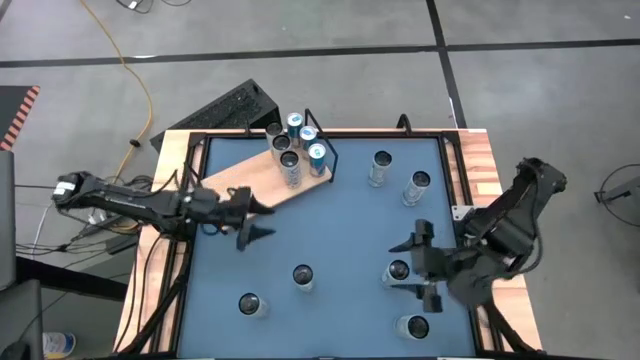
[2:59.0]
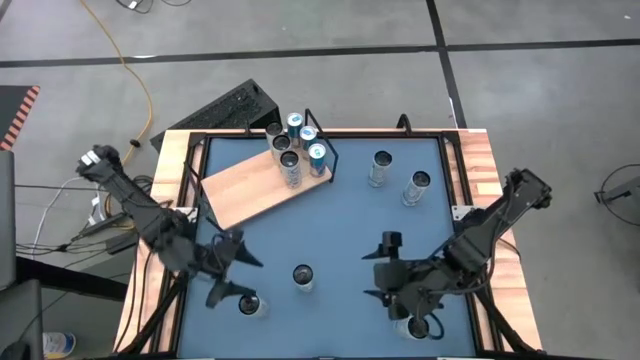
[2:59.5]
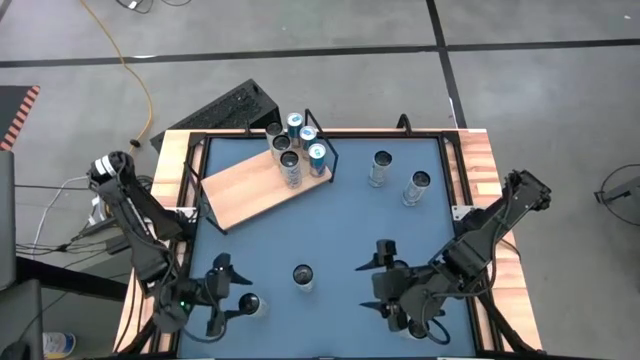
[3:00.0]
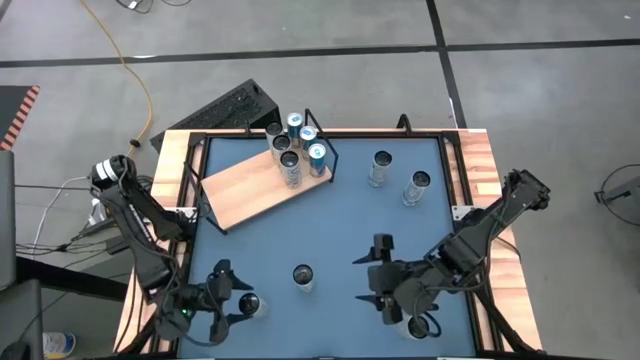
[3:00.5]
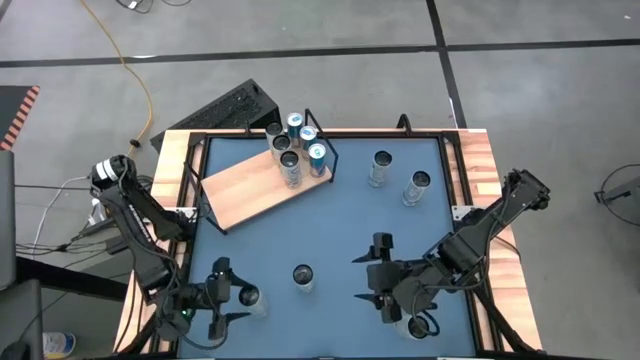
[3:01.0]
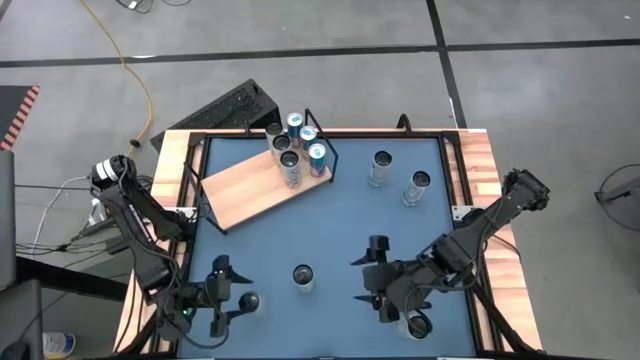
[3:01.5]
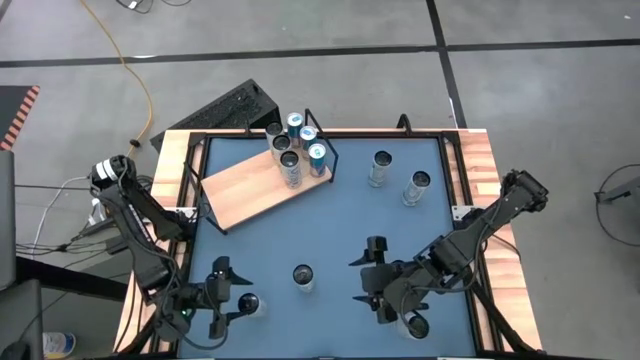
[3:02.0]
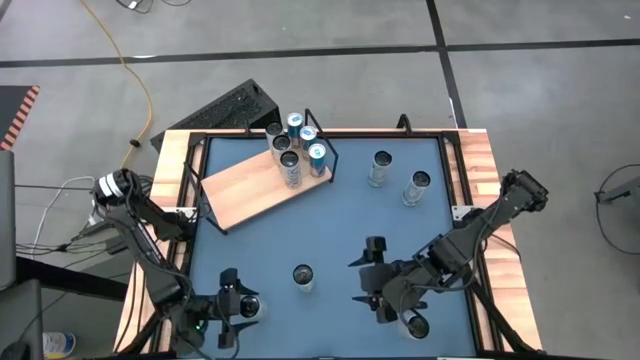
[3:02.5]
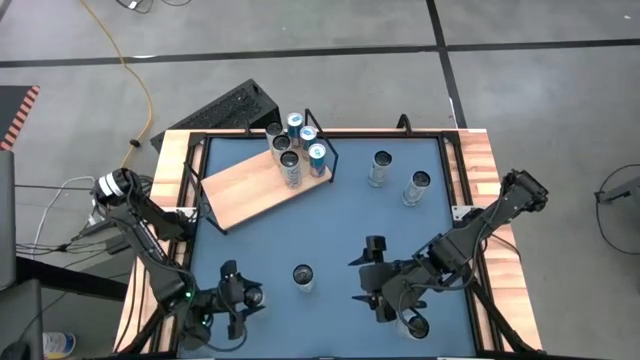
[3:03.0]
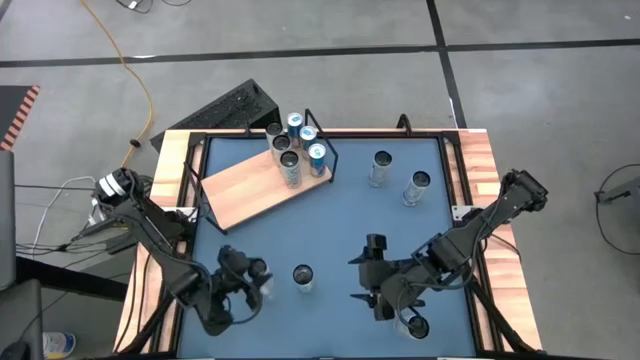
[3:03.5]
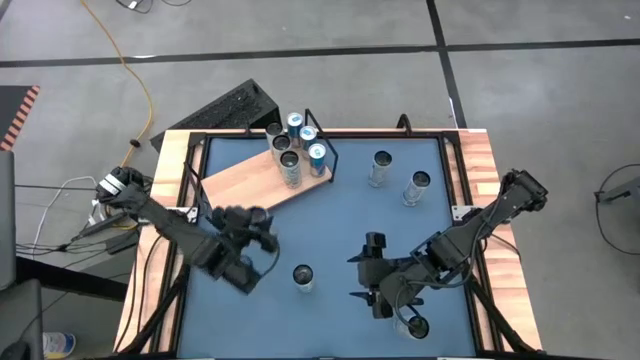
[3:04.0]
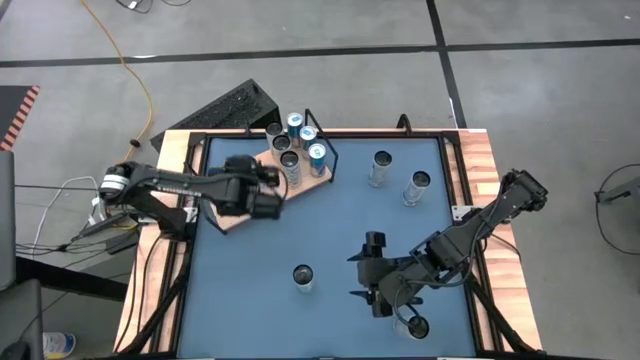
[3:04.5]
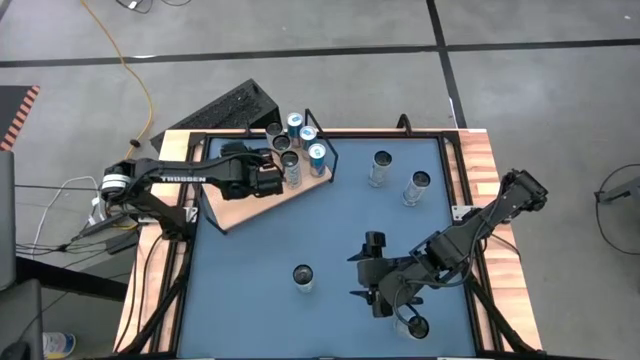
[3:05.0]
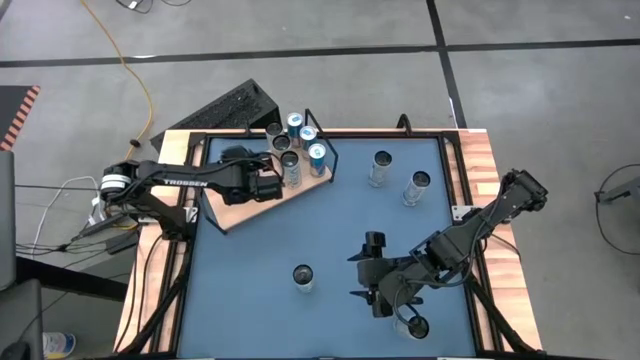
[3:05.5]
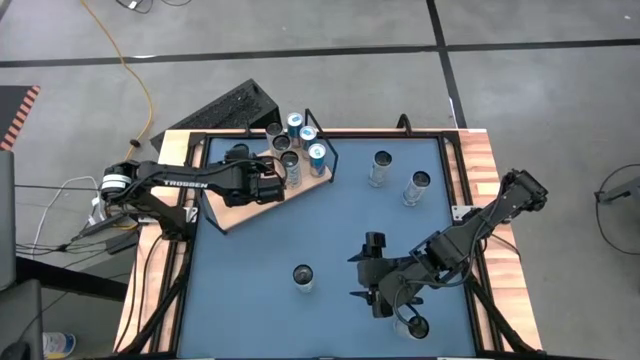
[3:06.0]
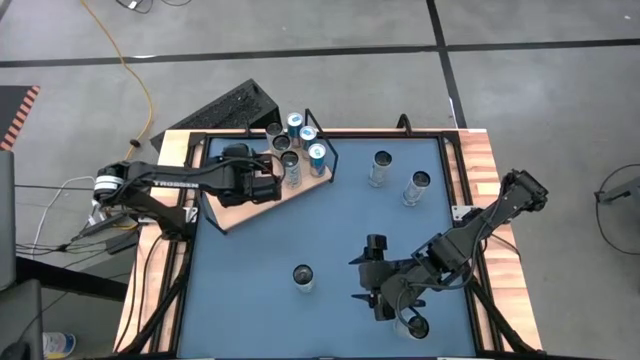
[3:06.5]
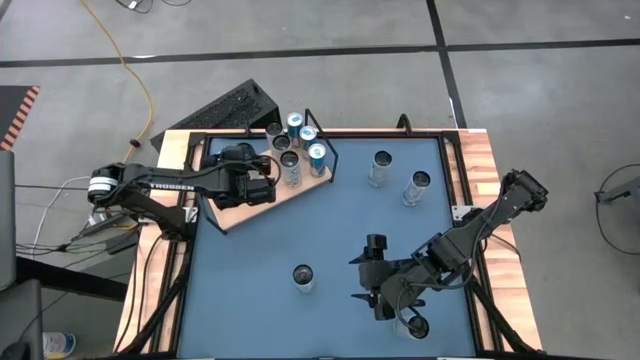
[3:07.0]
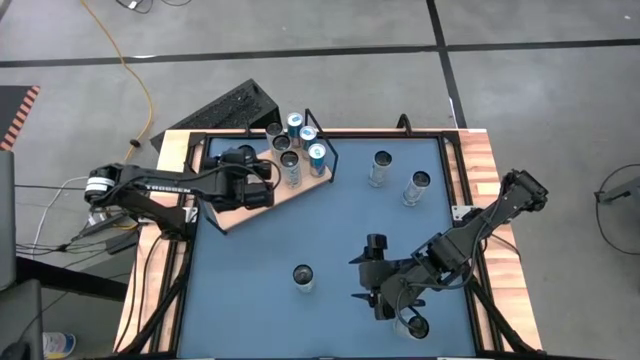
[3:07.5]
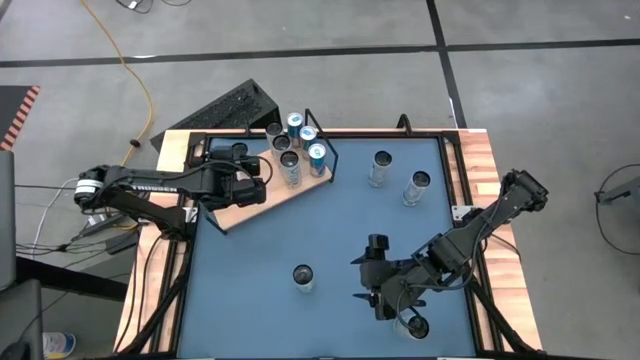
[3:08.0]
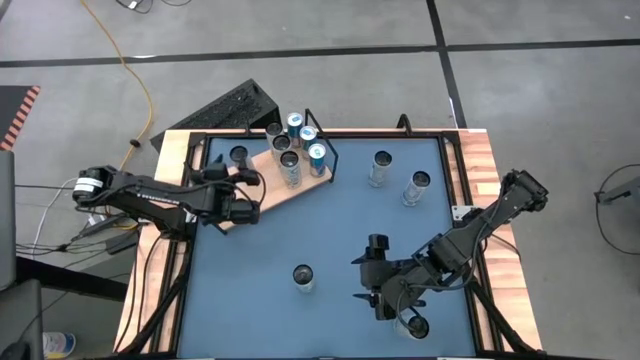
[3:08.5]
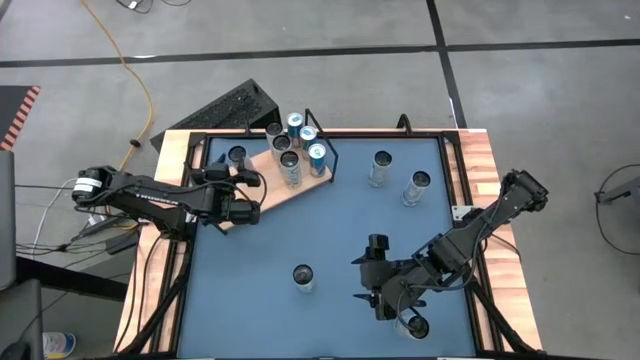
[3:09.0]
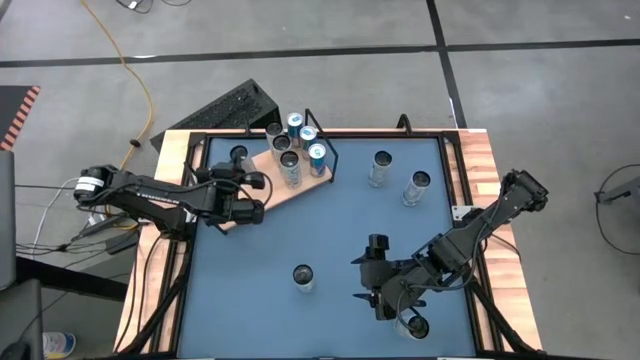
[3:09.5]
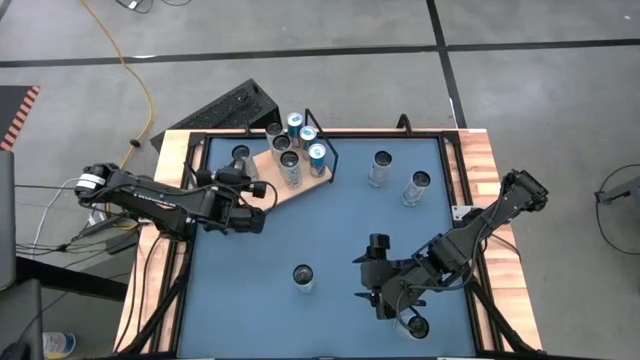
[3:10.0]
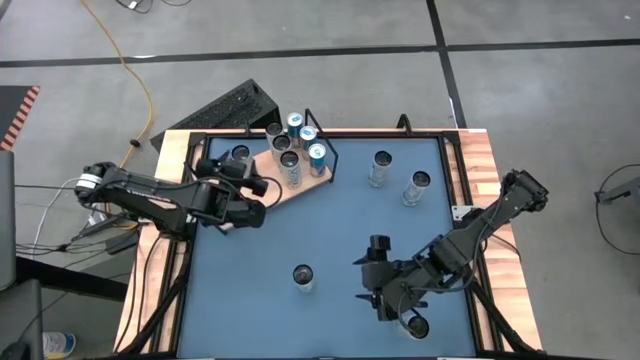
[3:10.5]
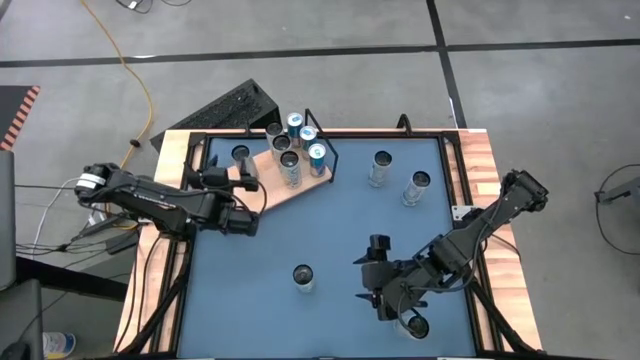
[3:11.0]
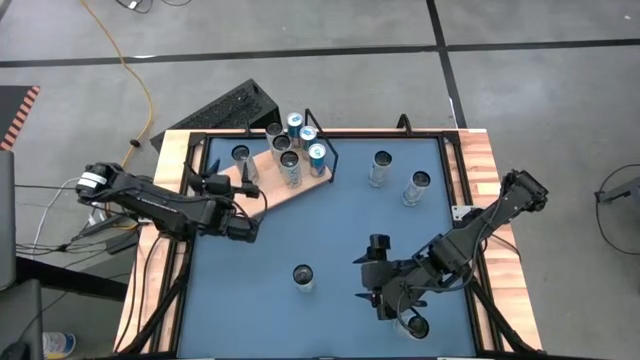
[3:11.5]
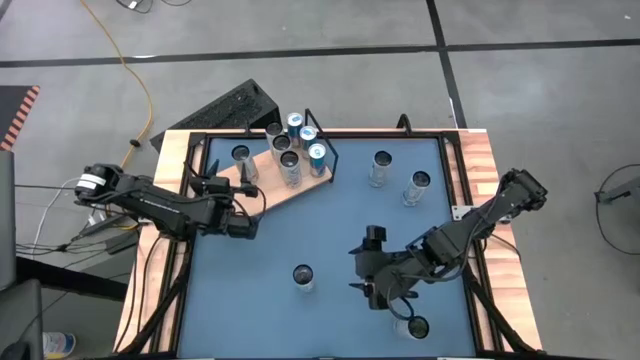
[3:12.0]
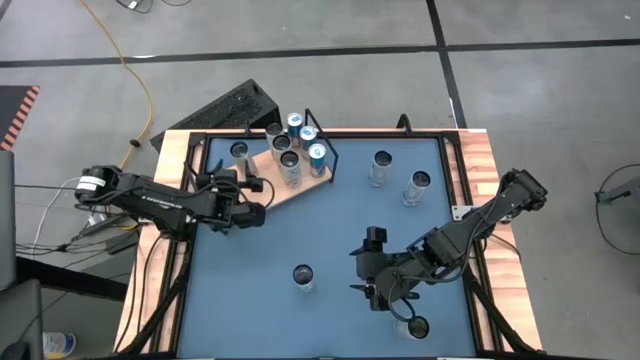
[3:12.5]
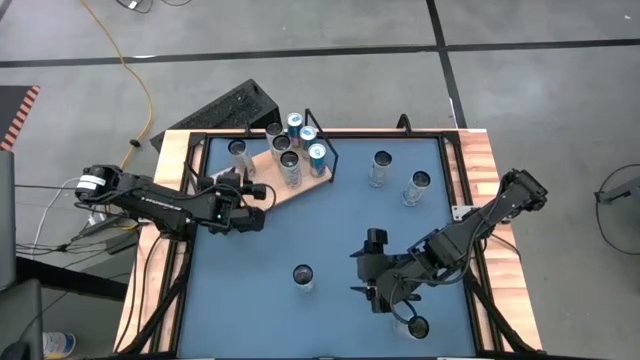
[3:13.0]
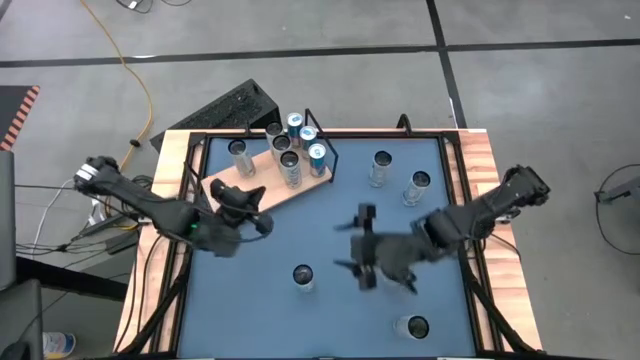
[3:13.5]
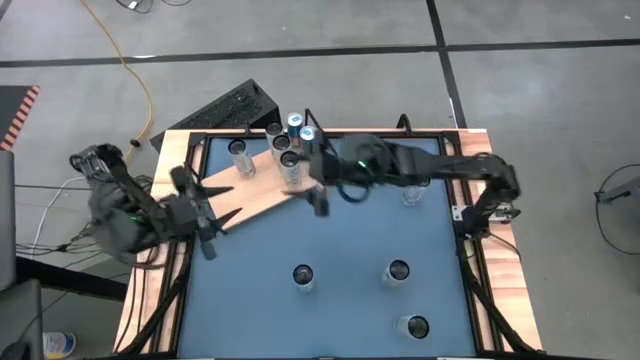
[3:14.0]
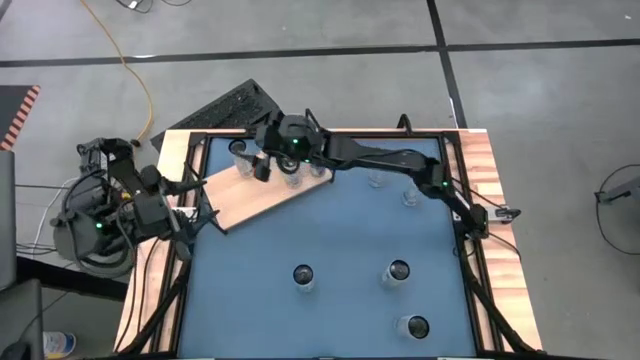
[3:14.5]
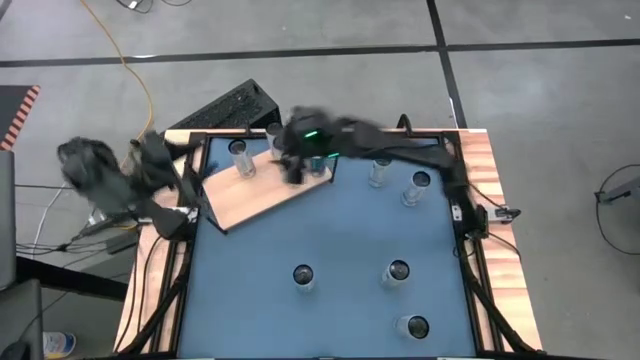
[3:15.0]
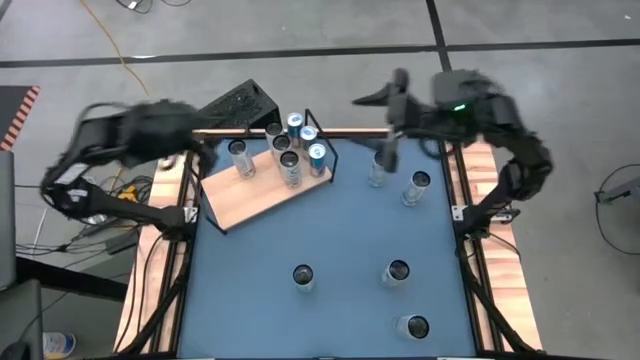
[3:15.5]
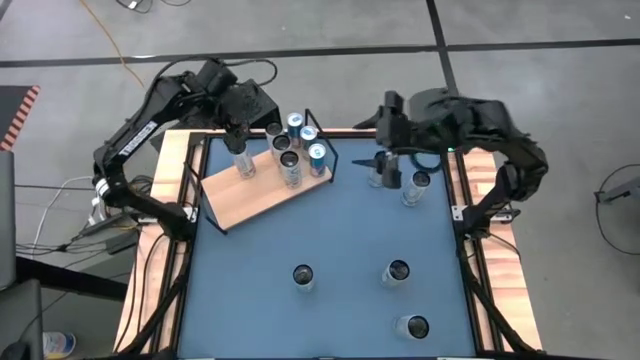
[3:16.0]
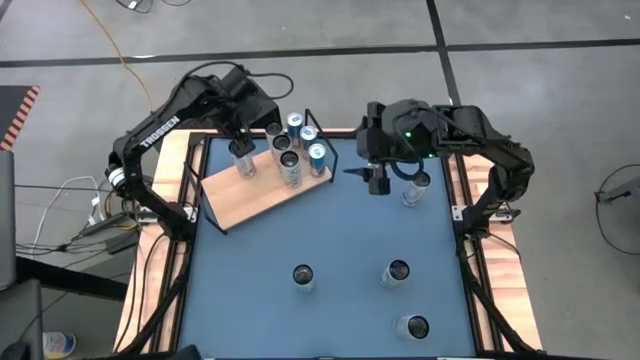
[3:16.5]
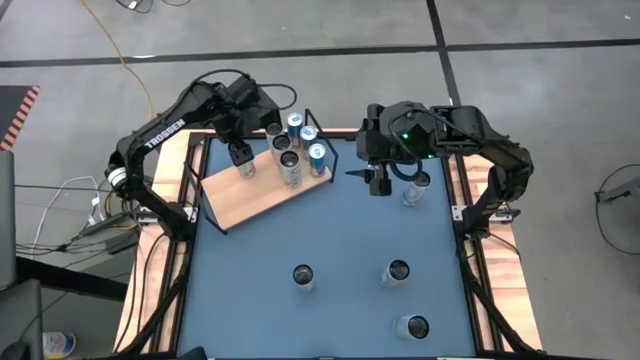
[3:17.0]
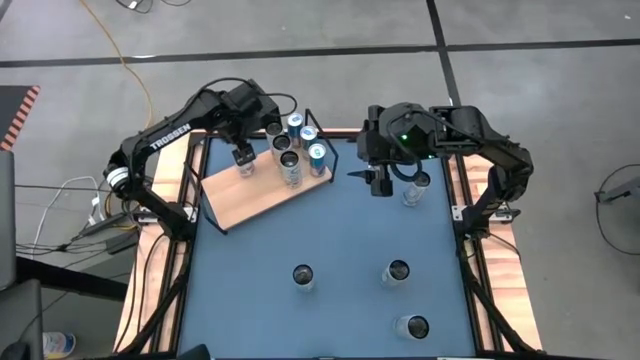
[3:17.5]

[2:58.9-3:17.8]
Task: Place canned beverage on shelf
Put the bottom left white and pink soda can on the shelf
